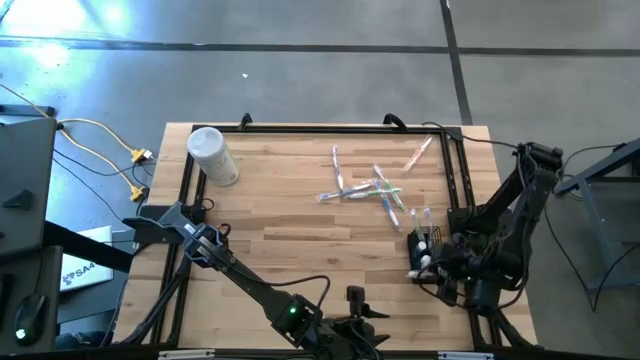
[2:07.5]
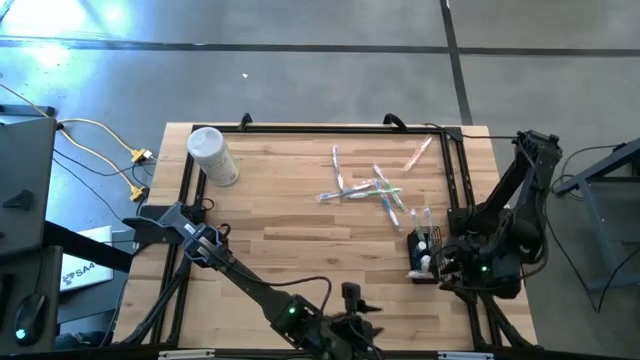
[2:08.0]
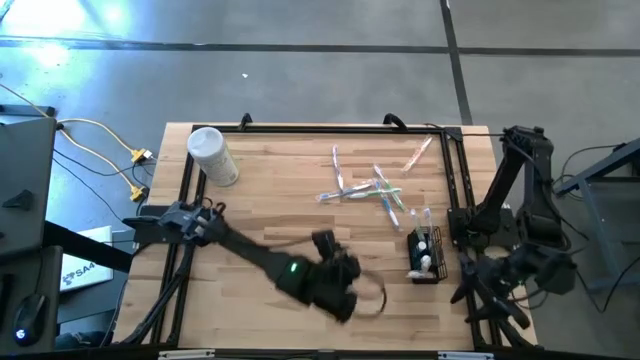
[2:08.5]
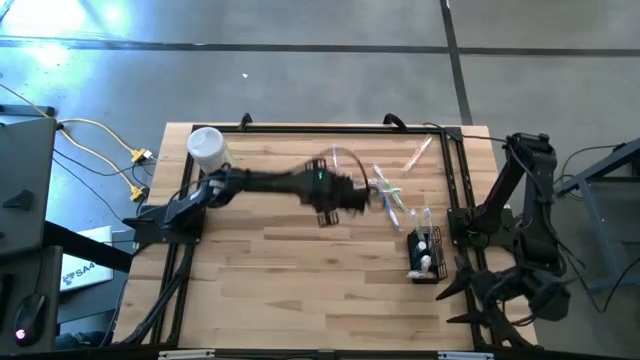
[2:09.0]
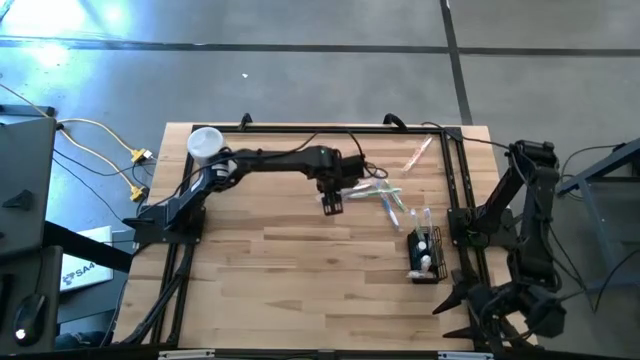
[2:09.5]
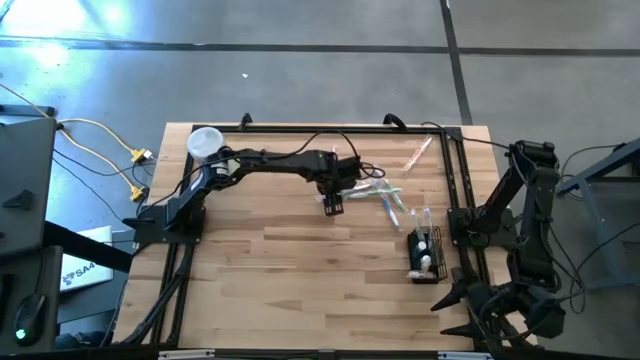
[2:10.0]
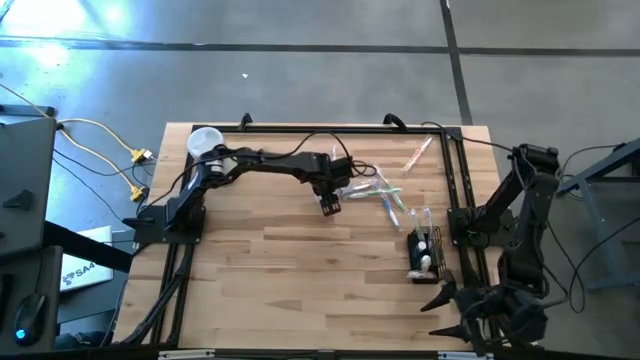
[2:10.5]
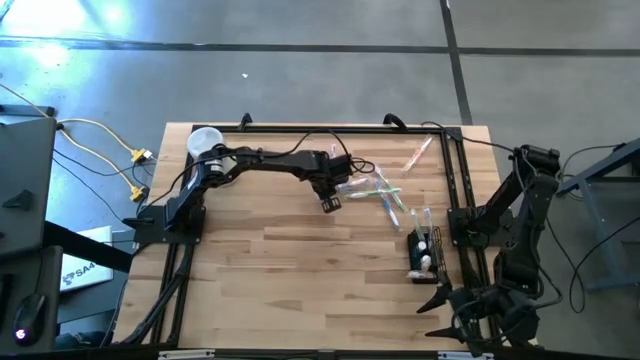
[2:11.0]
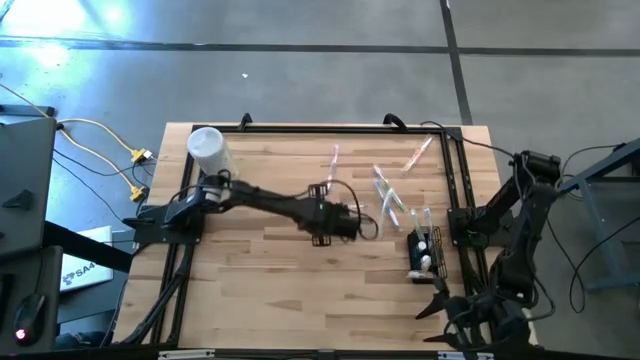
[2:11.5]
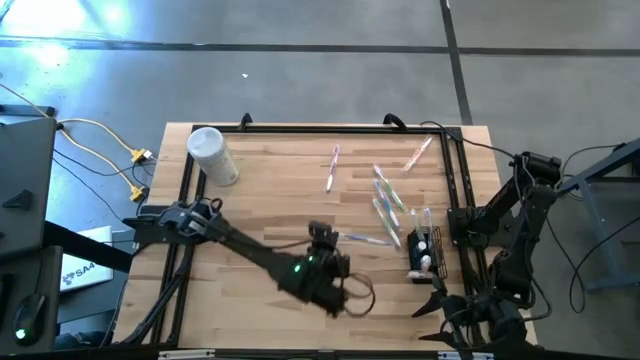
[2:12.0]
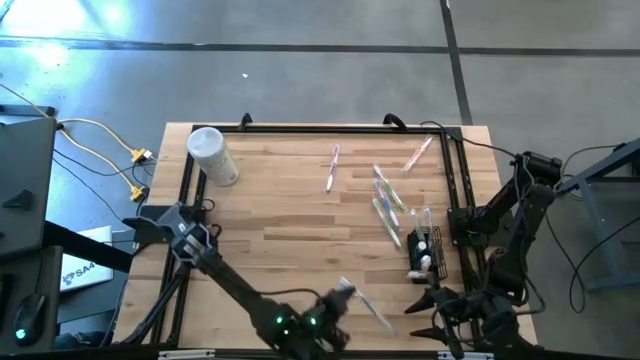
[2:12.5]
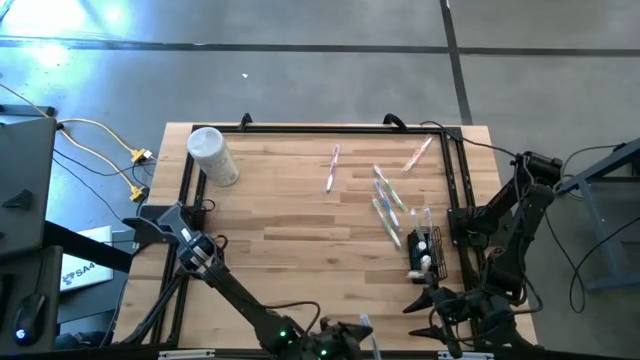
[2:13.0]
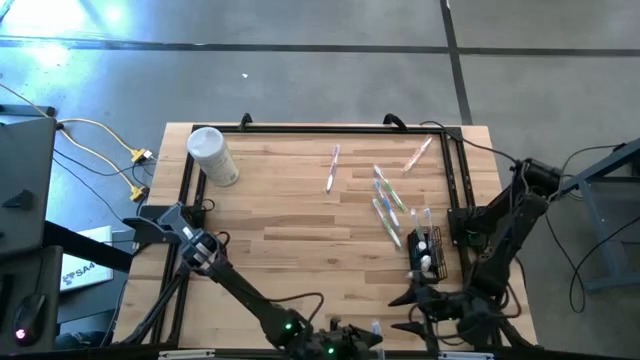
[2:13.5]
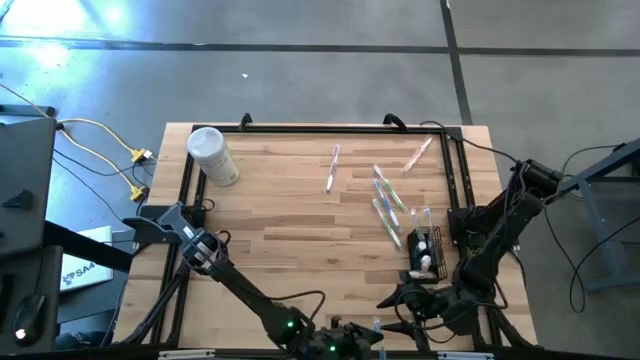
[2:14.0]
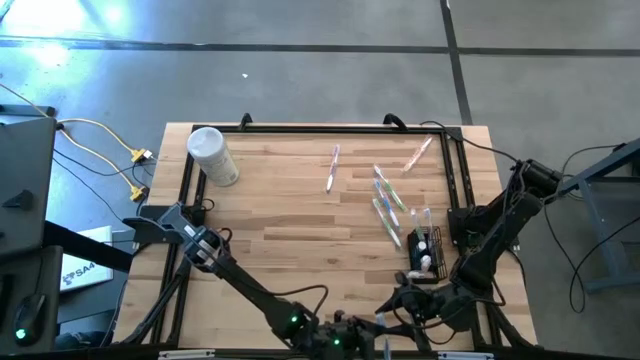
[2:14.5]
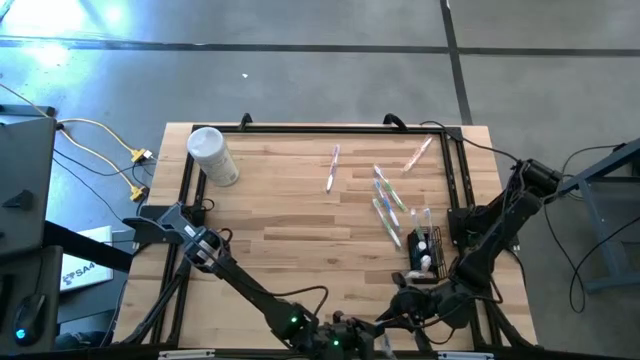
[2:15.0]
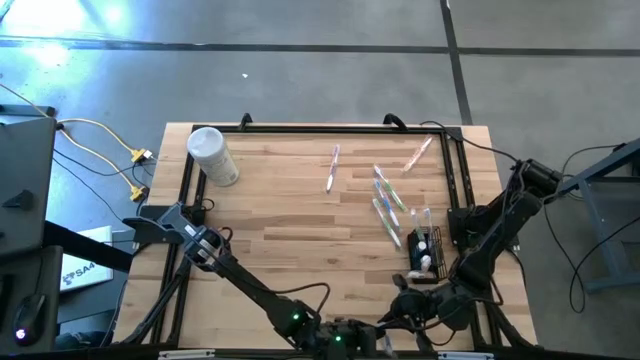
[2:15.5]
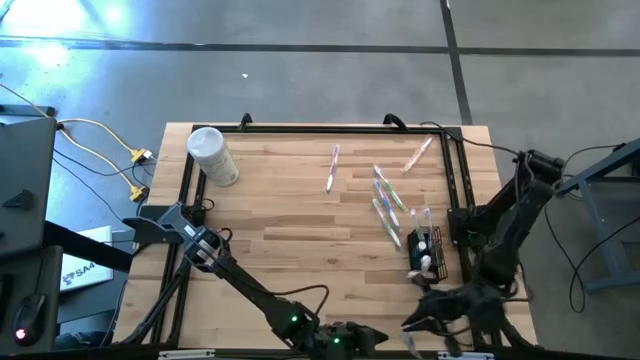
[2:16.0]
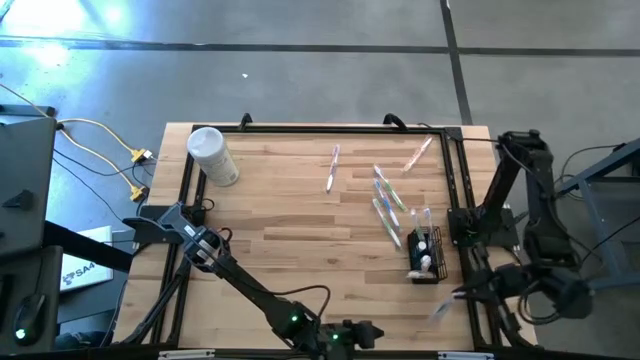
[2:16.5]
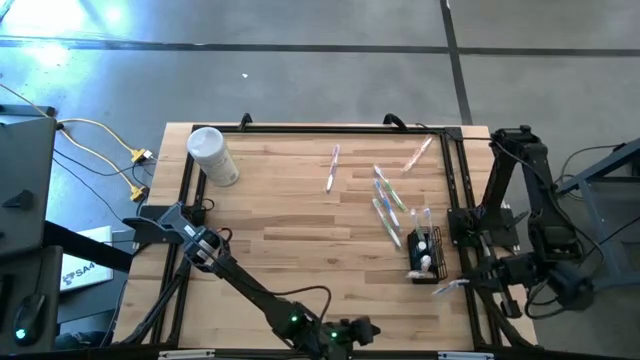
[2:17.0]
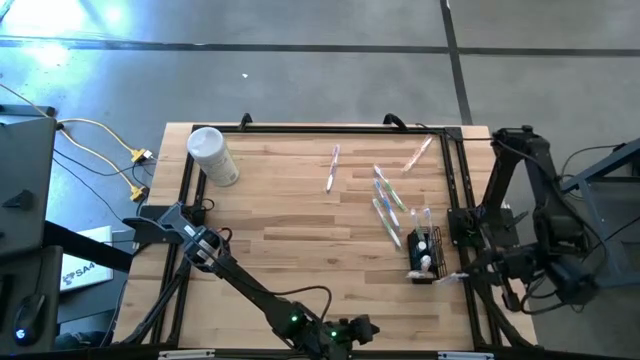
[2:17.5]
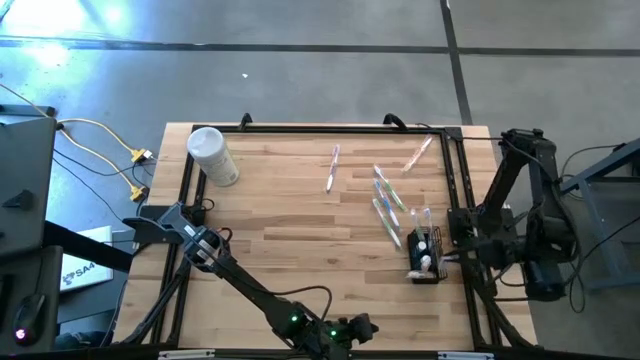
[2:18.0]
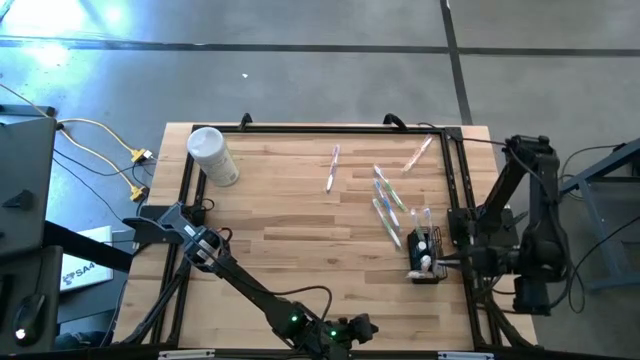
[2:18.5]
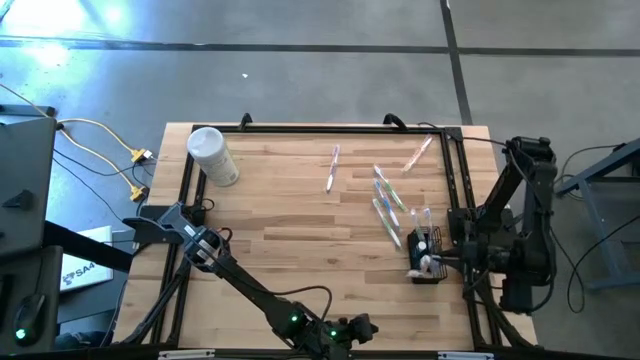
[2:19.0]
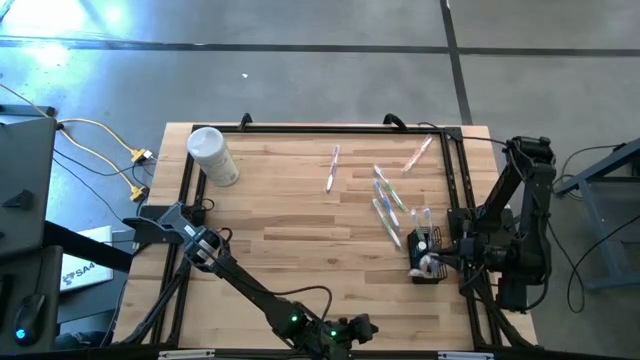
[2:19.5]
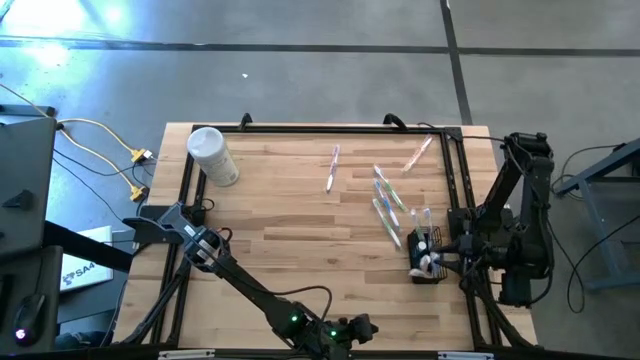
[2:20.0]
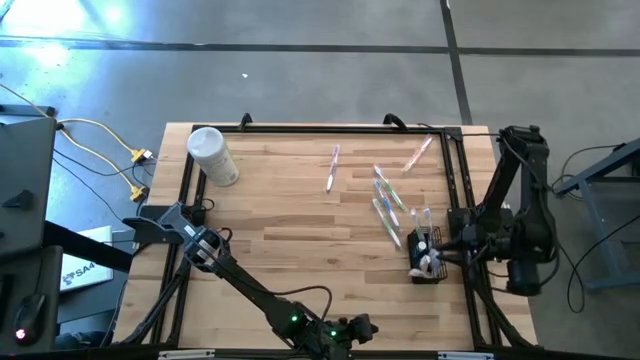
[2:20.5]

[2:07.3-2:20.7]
Task: Pick & Place toothbrushing station
Put the left blue toothbrush into the black mesh organizer

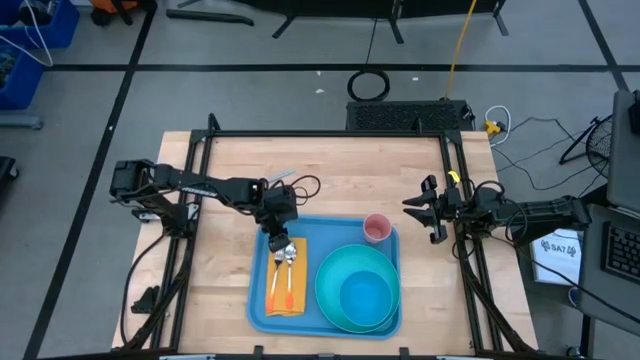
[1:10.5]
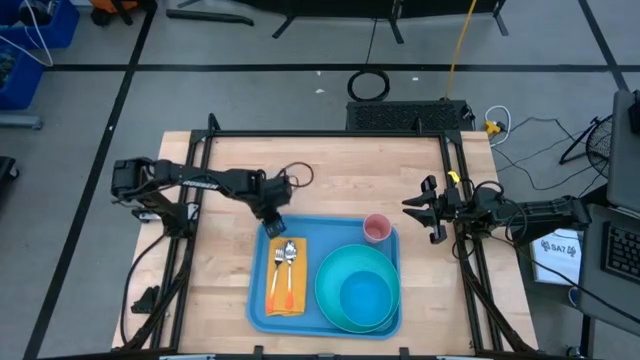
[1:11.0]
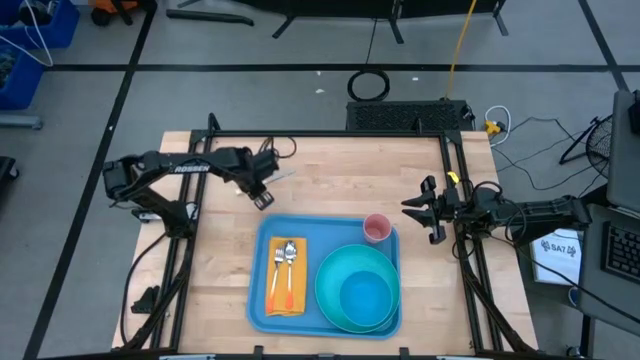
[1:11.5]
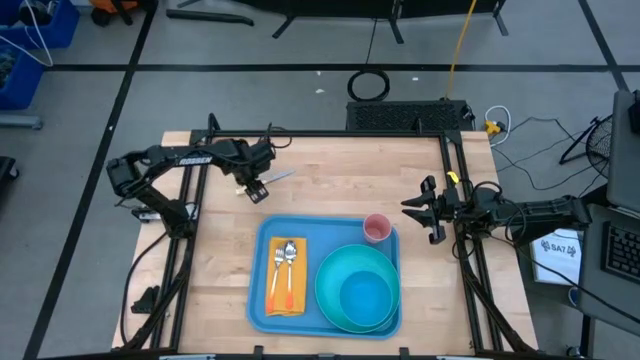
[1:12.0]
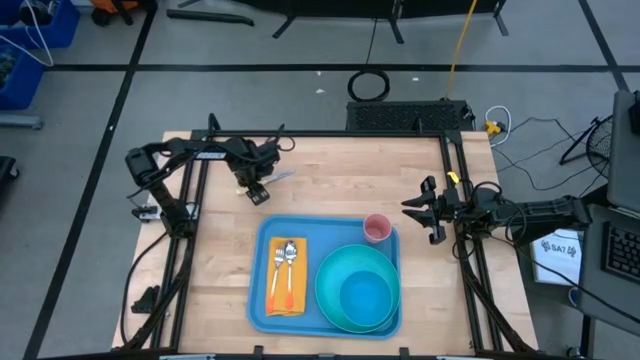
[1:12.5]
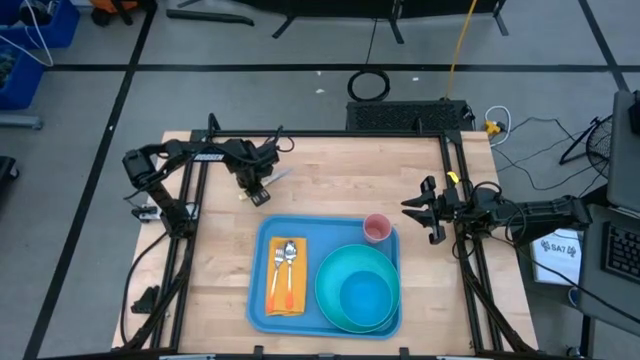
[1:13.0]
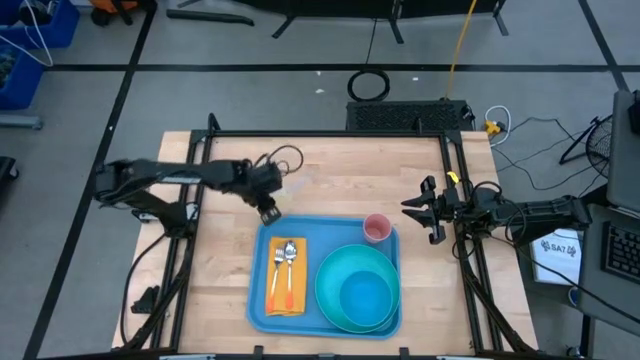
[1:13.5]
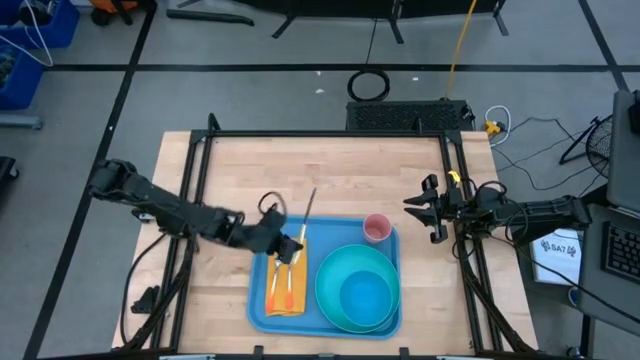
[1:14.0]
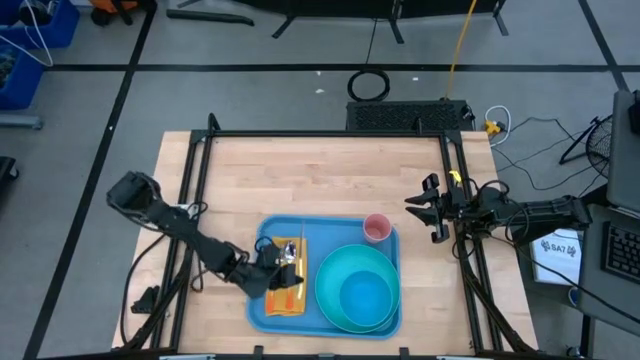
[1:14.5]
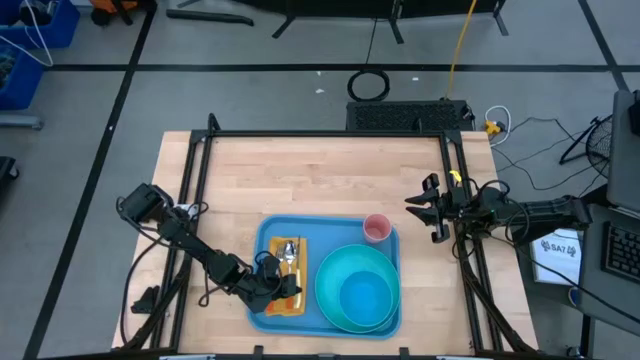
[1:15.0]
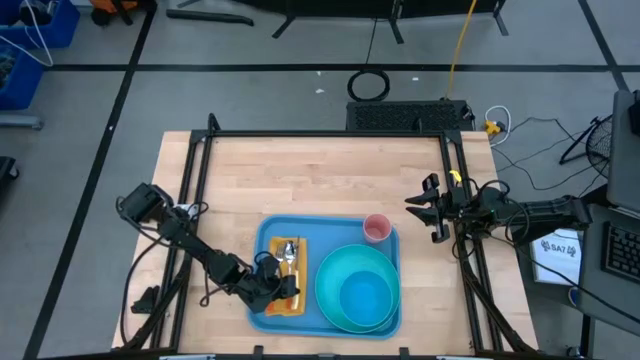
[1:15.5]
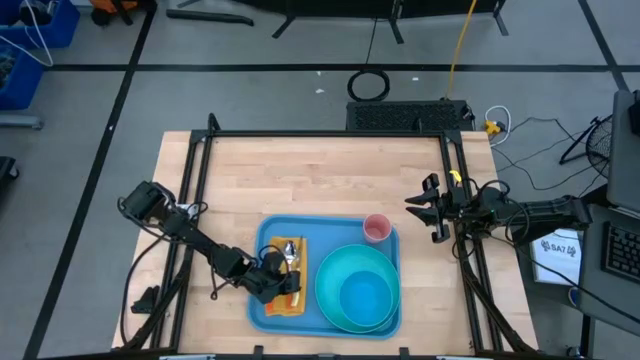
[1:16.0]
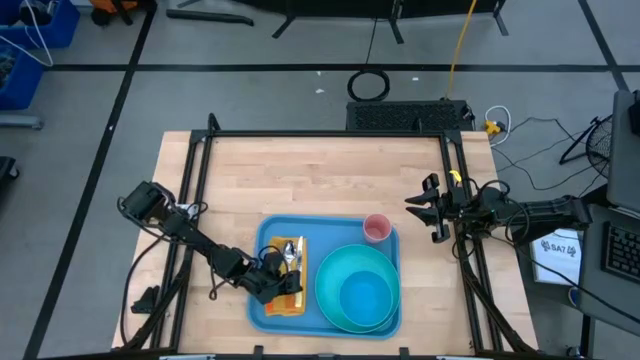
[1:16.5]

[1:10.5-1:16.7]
Task: Set up tray
Put the yellow knife on the yellow napkin to the right of the orange spoon
